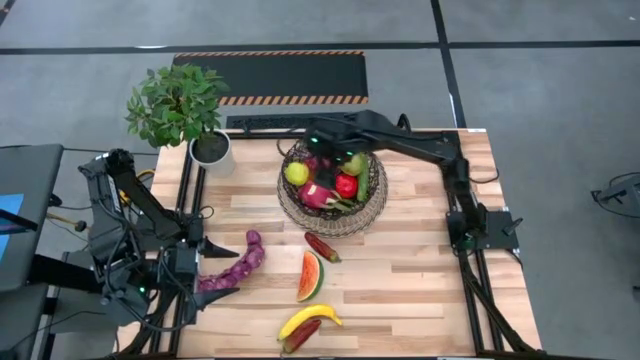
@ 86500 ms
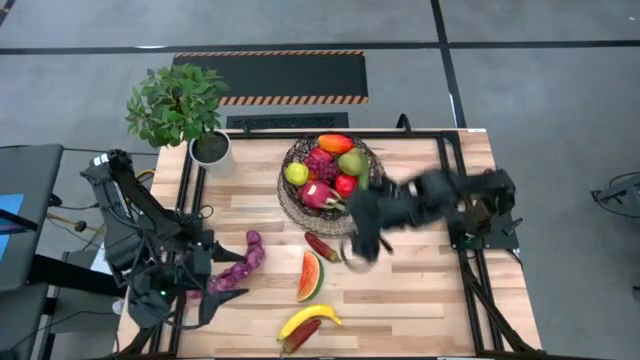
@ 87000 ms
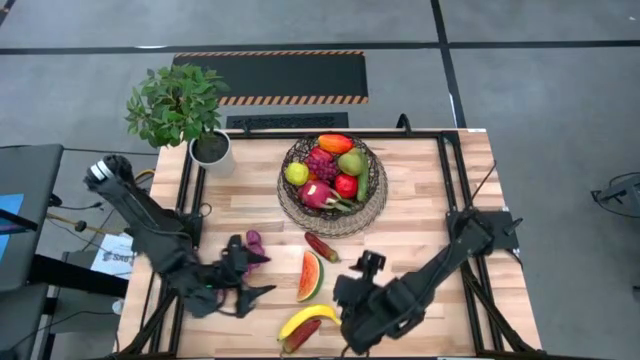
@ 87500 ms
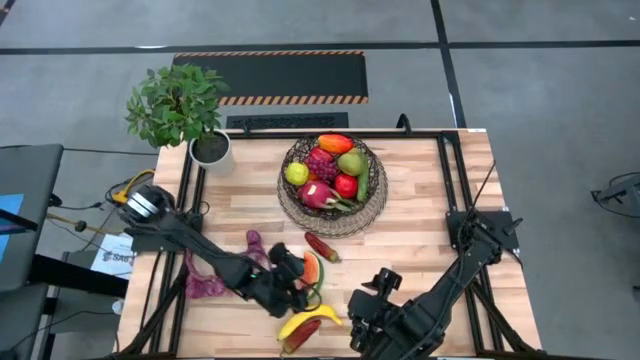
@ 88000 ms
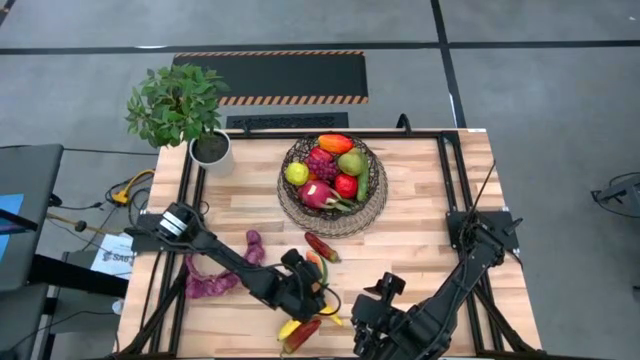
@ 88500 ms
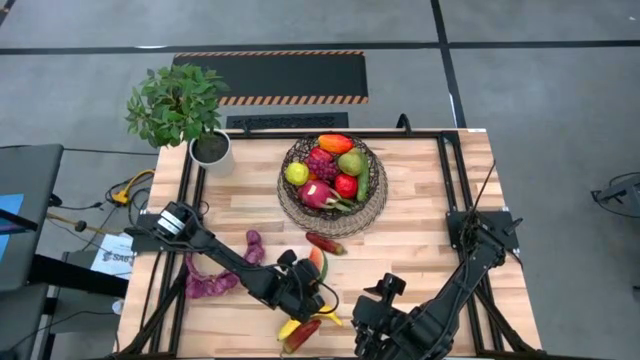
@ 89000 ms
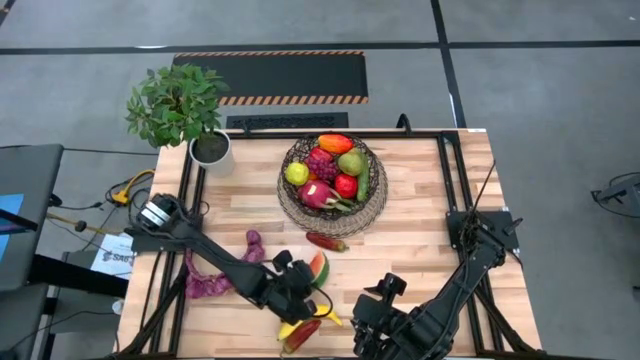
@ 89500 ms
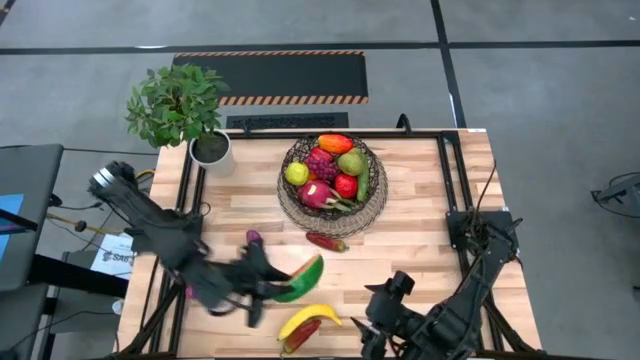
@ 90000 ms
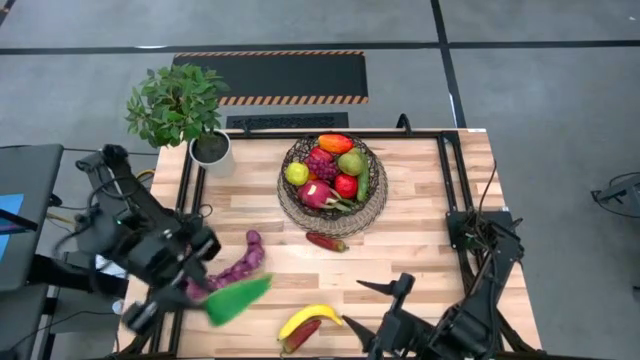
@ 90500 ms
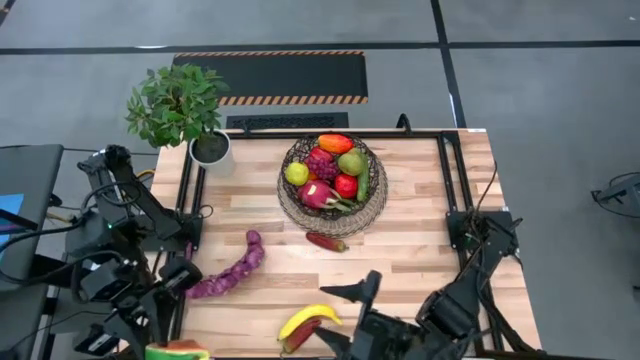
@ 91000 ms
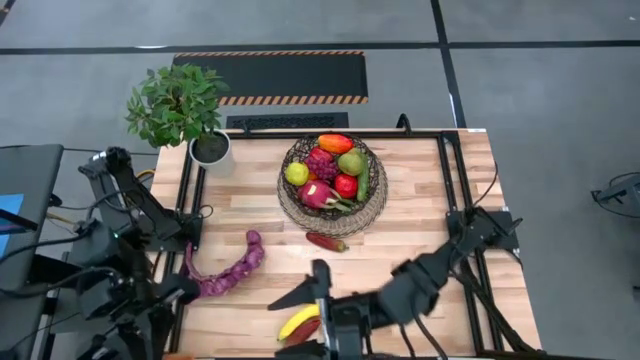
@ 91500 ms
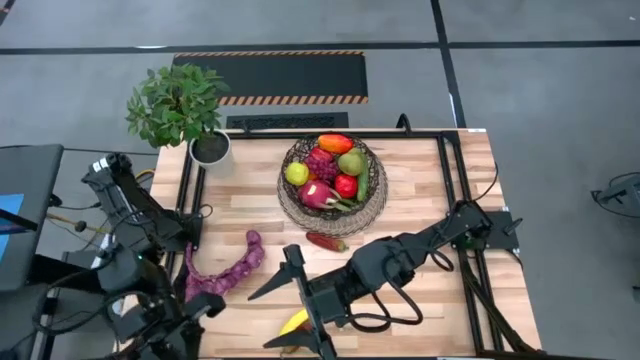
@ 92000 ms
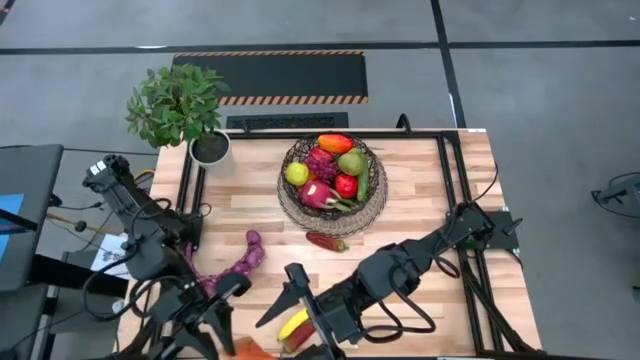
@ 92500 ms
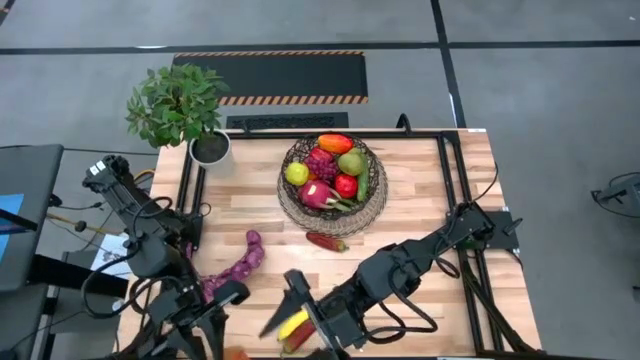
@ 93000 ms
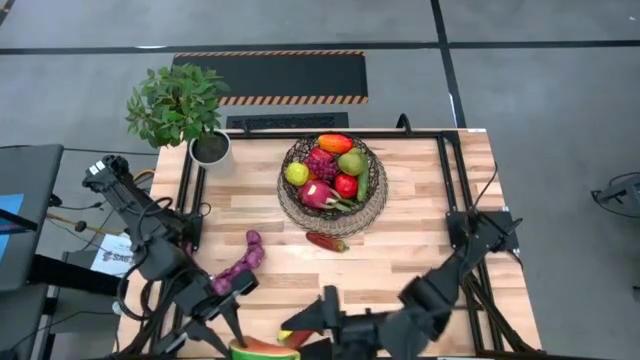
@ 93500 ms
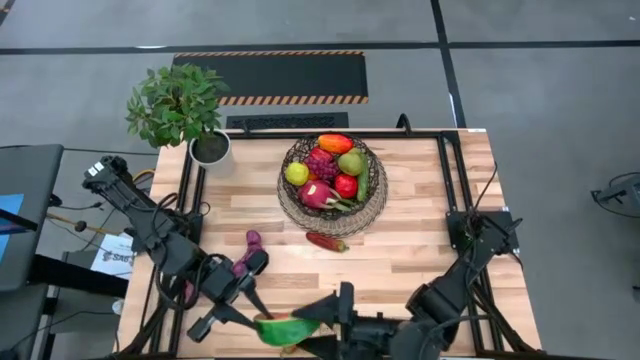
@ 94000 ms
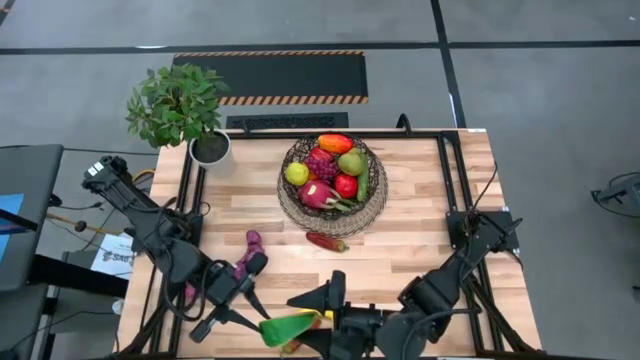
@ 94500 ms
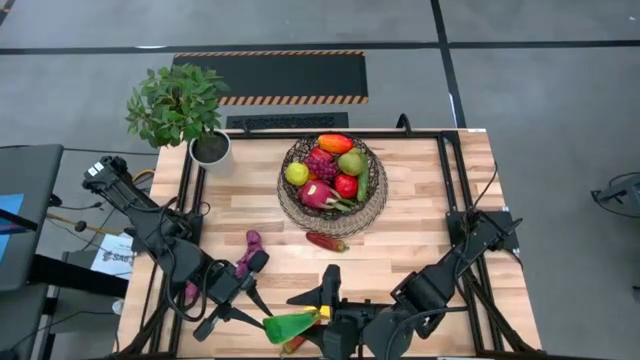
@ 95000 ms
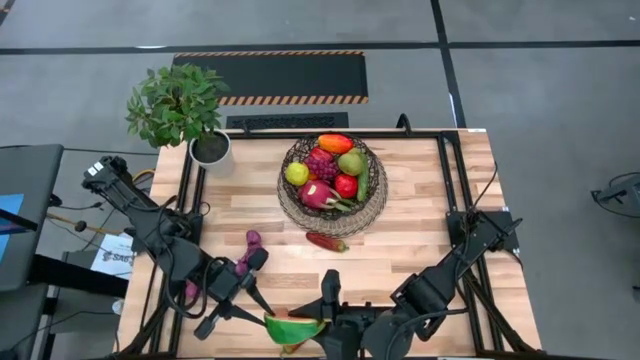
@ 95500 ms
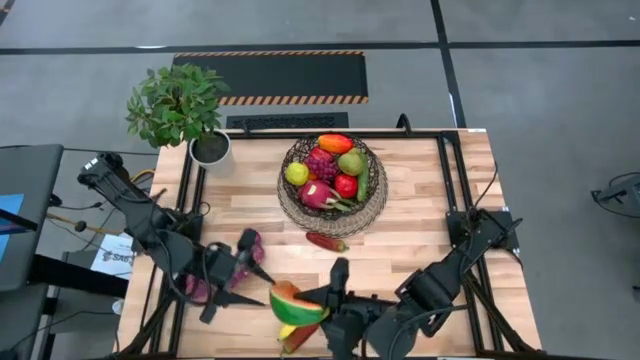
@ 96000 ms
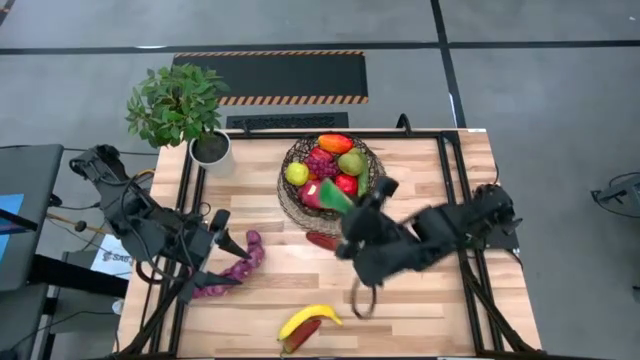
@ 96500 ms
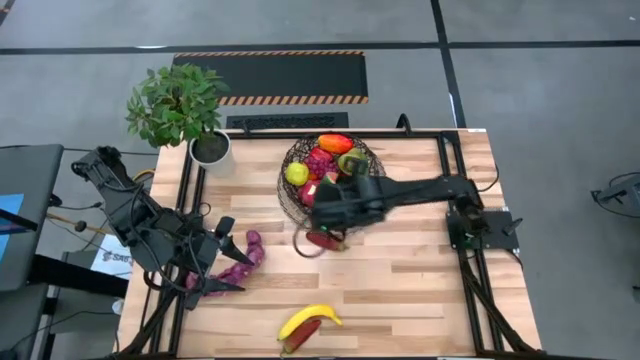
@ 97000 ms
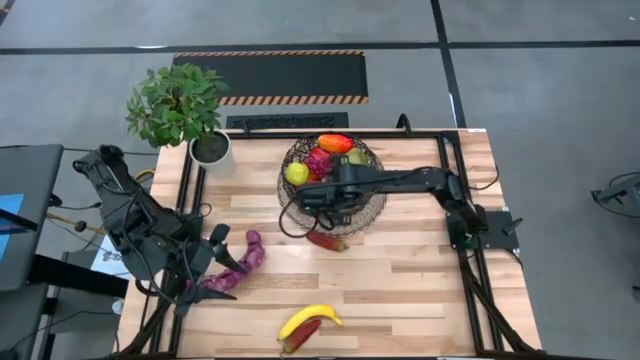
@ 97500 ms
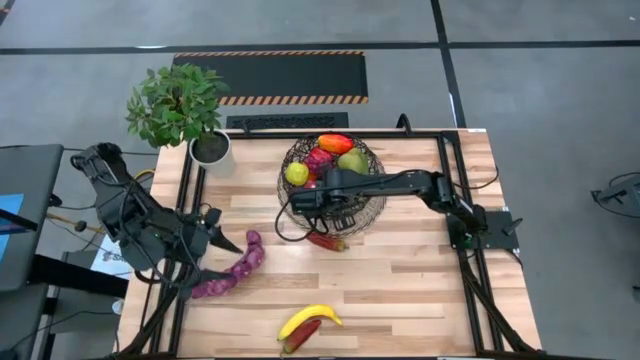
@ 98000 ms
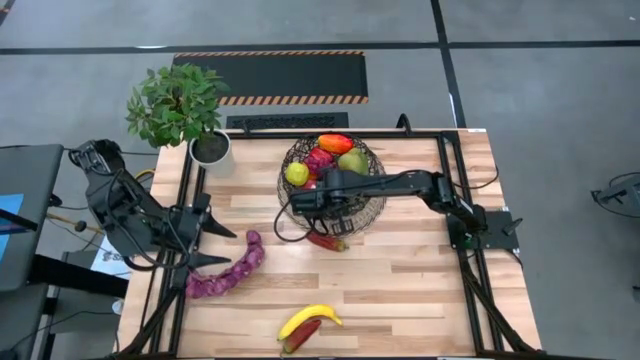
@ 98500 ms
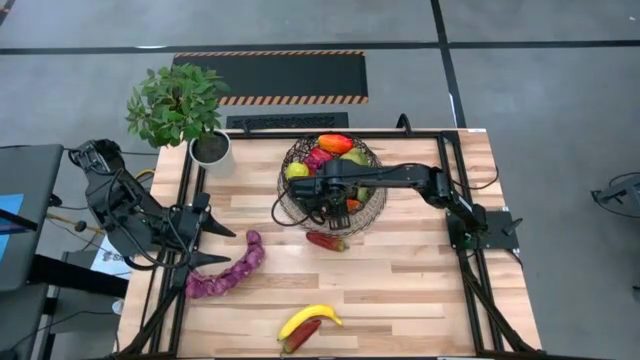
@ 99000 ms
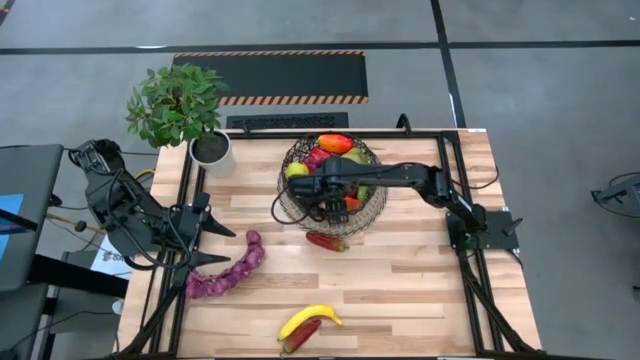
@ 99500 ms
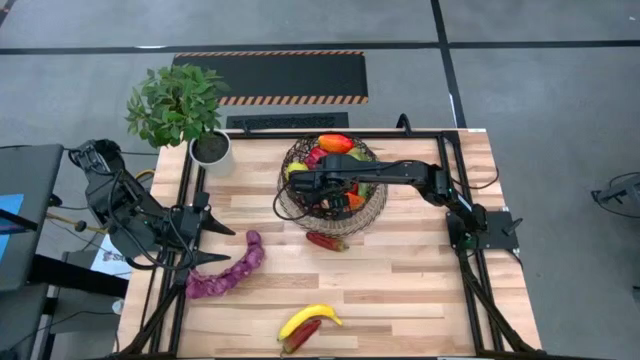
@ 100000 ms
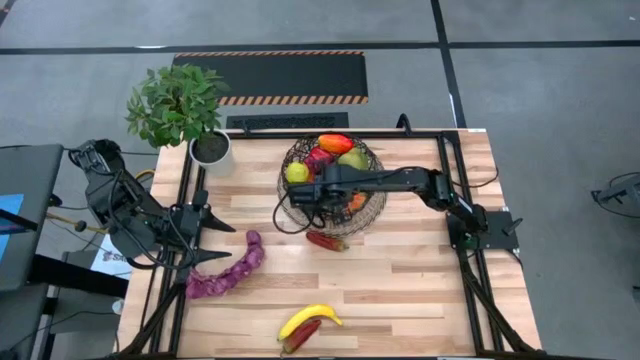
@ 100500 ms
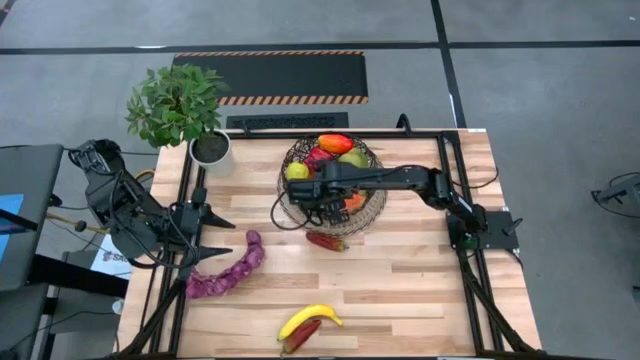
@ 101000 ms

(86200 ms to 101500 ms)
Task: Build produce basket
Put the sliced watermelon into the basket

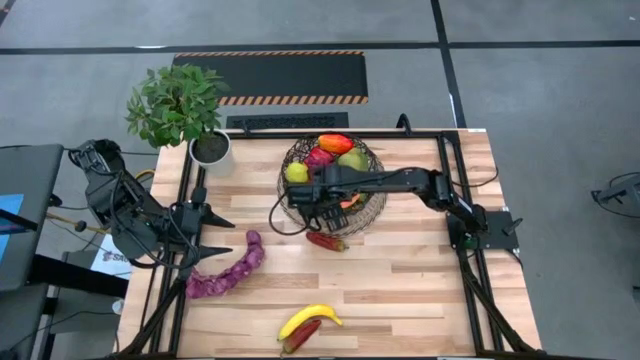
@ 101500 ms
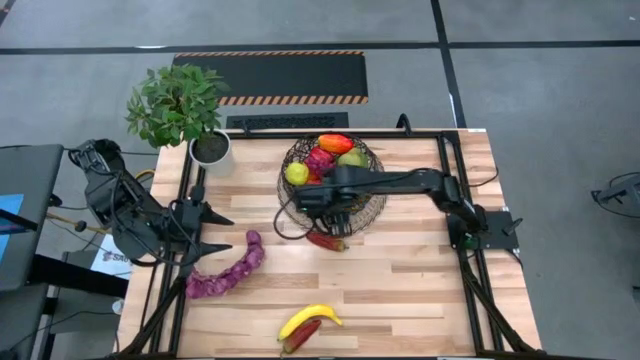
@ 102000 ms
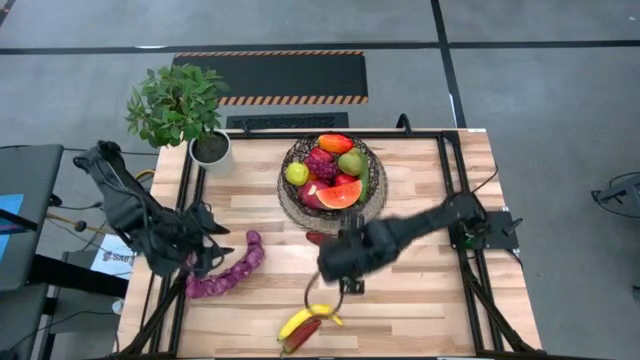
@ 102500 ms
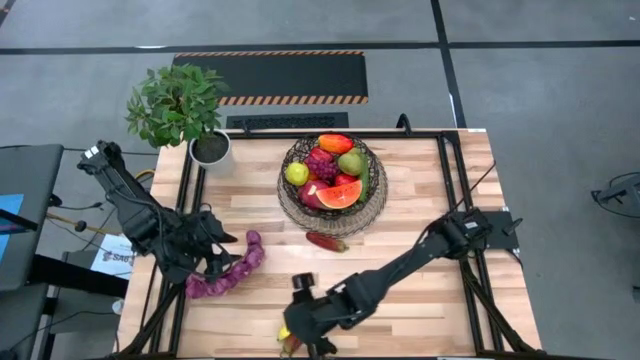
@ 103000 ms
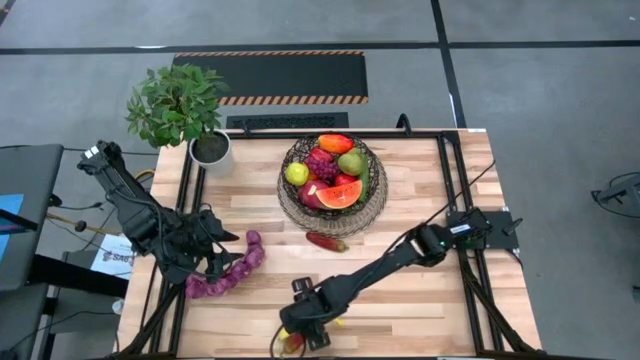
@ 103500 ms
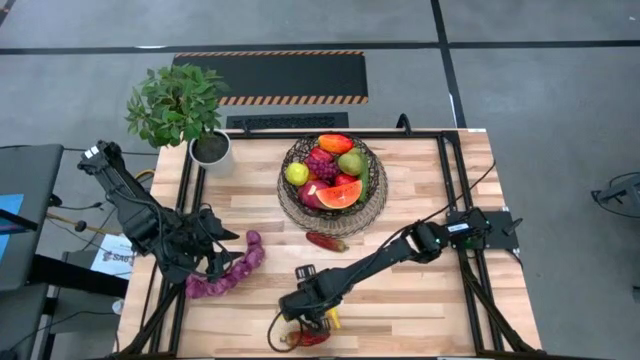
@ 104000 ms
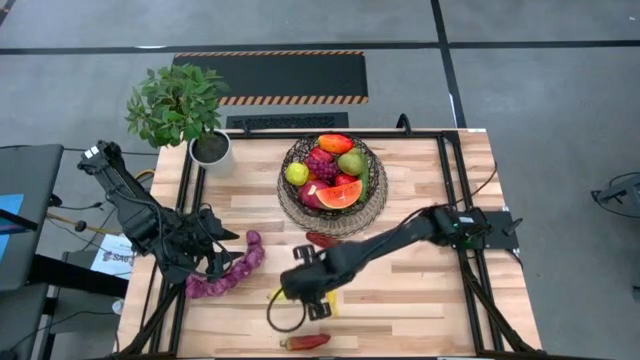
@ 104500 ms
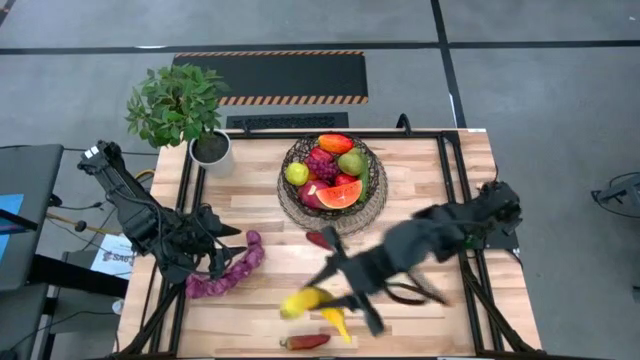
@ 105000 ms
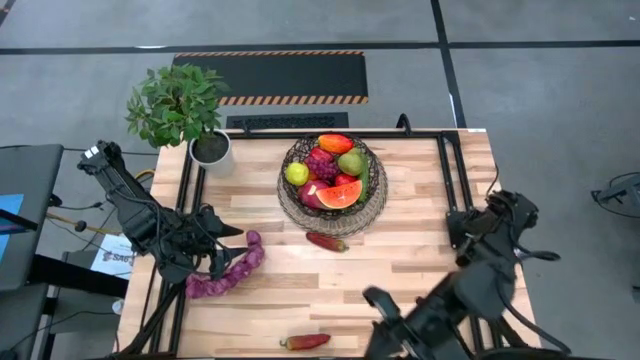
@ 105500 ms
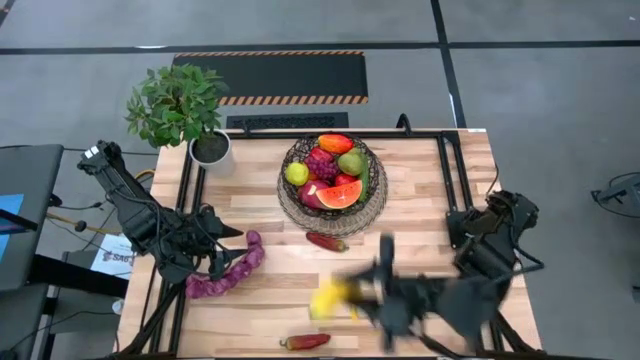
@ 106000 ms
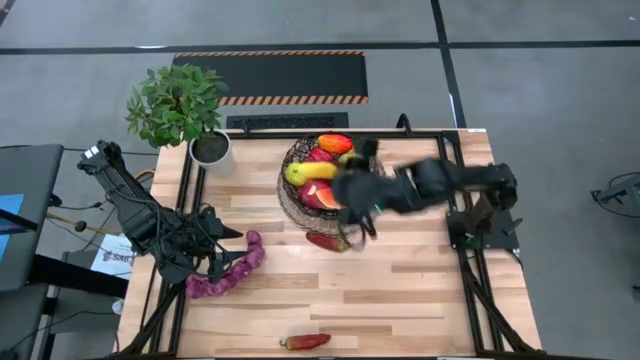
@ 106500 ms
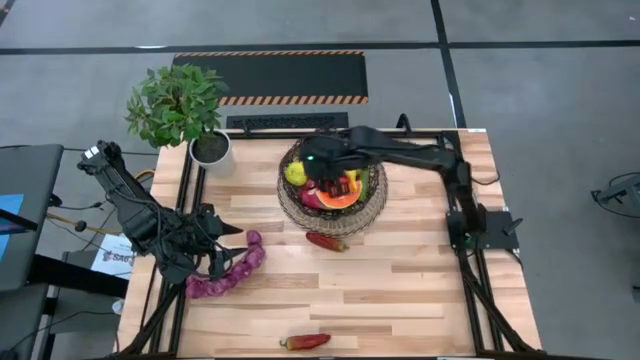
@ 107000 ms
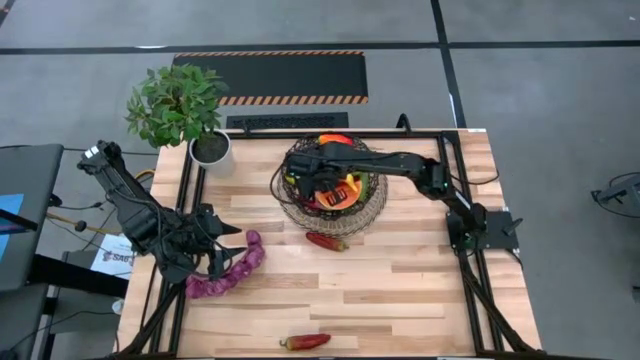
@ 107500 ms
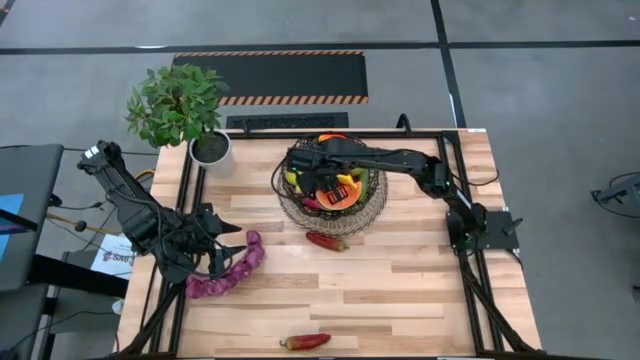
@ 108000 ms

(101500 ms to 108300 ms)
Put the banana into the basket
